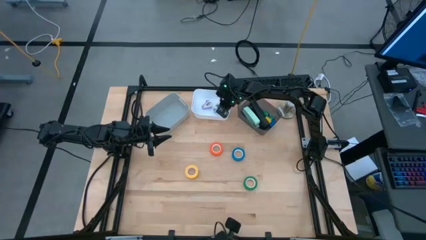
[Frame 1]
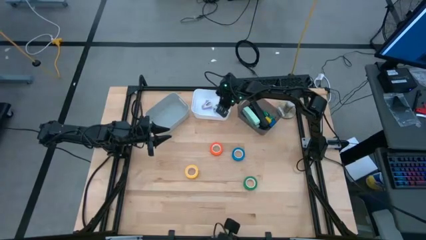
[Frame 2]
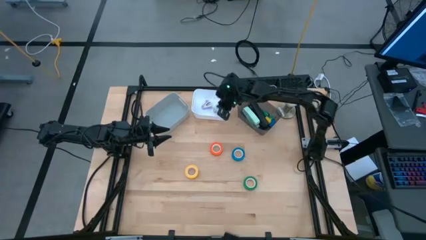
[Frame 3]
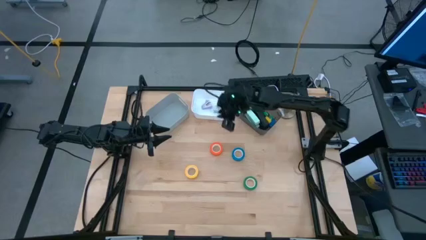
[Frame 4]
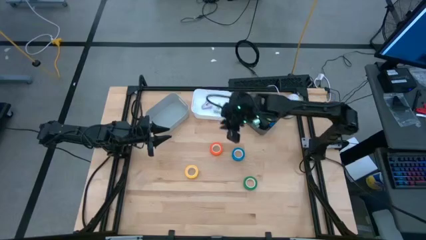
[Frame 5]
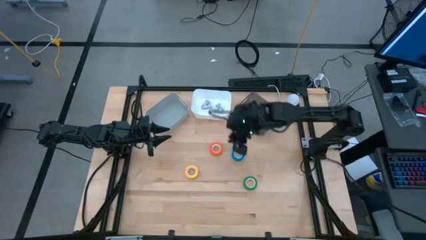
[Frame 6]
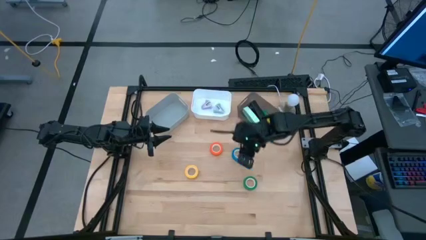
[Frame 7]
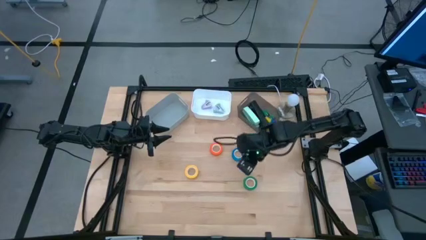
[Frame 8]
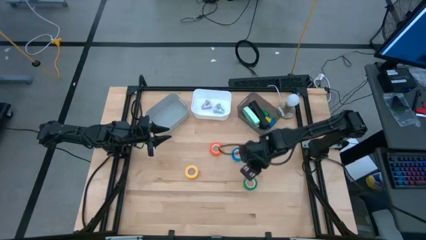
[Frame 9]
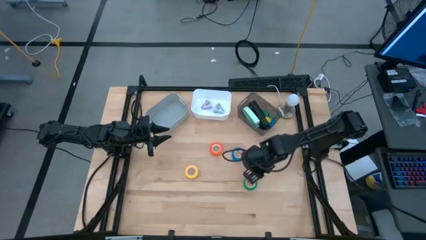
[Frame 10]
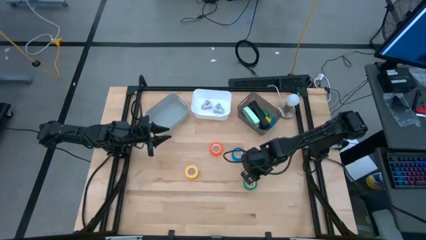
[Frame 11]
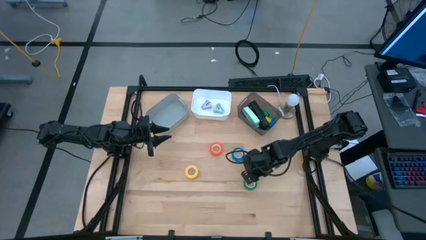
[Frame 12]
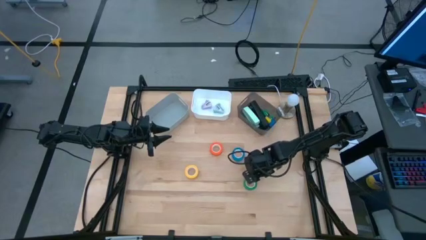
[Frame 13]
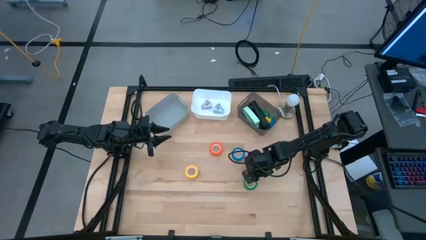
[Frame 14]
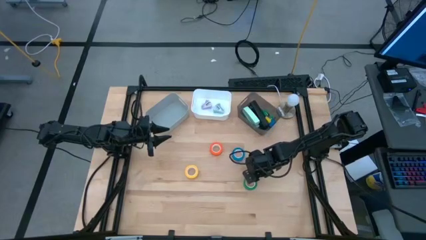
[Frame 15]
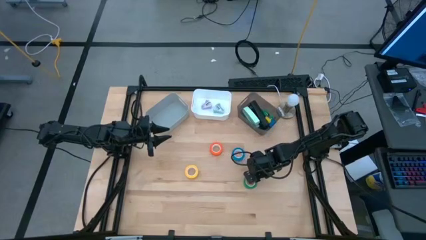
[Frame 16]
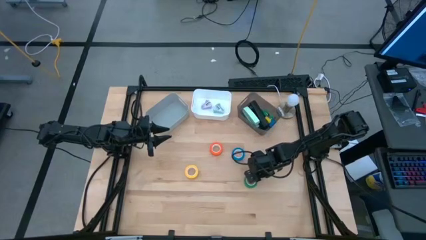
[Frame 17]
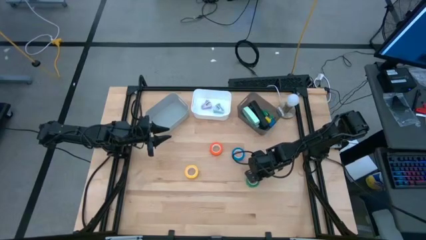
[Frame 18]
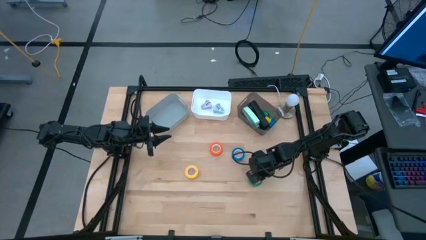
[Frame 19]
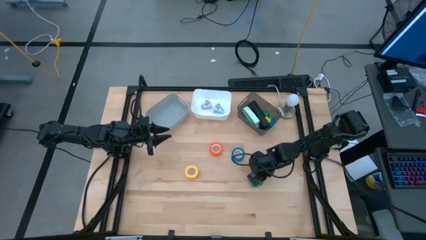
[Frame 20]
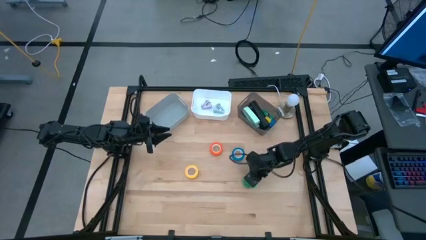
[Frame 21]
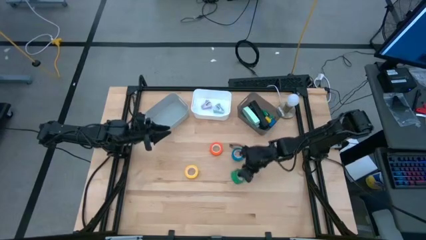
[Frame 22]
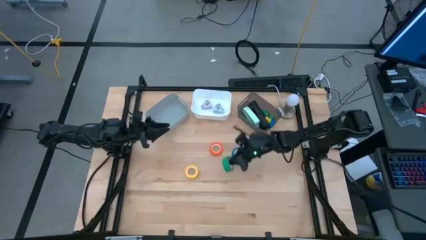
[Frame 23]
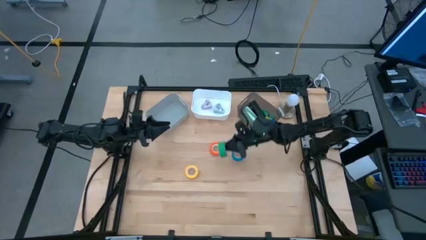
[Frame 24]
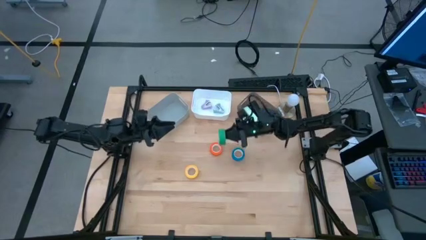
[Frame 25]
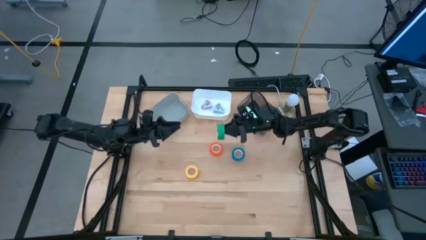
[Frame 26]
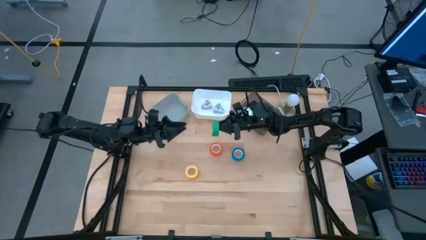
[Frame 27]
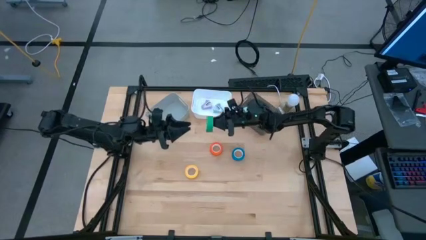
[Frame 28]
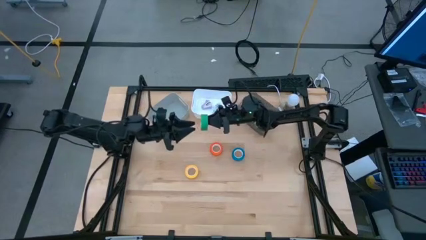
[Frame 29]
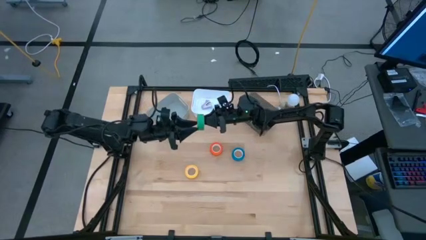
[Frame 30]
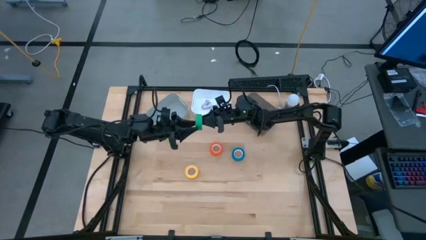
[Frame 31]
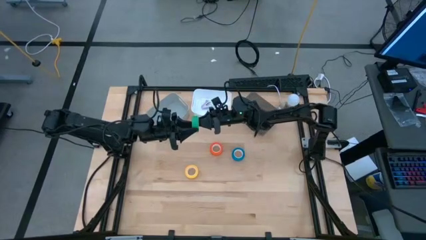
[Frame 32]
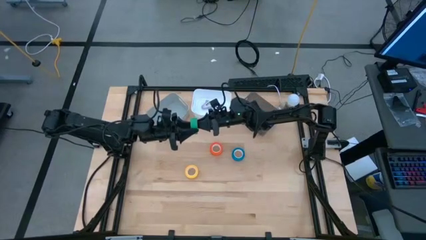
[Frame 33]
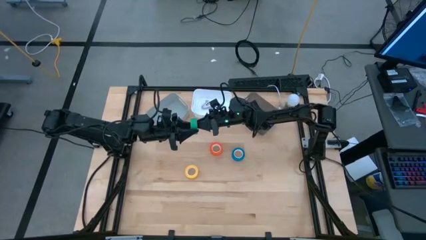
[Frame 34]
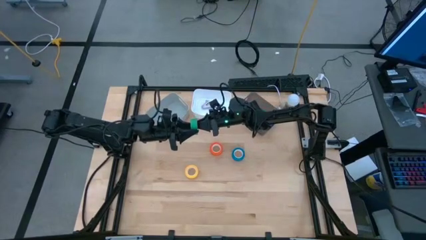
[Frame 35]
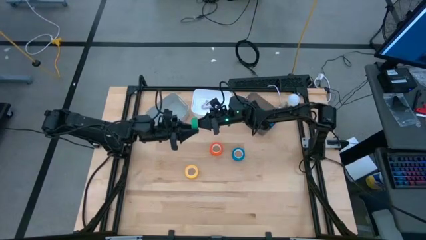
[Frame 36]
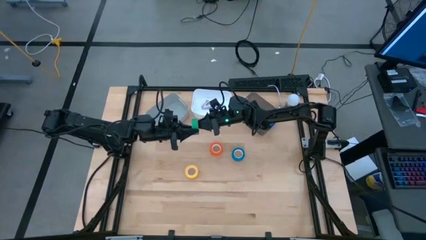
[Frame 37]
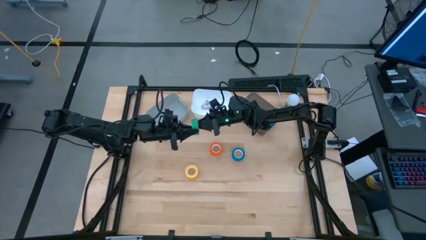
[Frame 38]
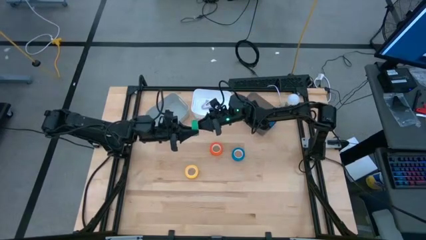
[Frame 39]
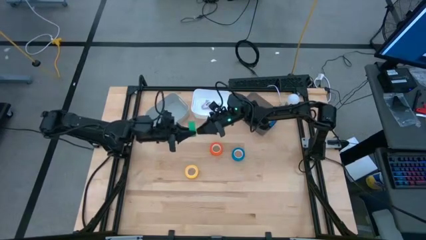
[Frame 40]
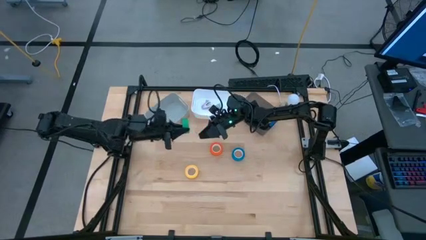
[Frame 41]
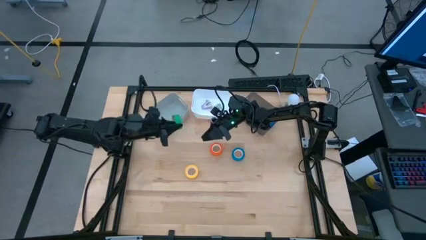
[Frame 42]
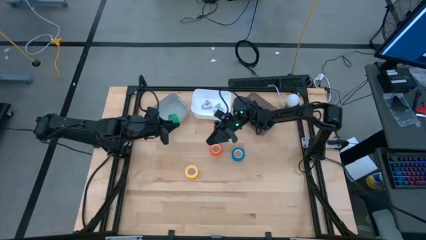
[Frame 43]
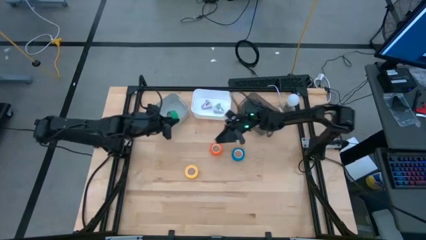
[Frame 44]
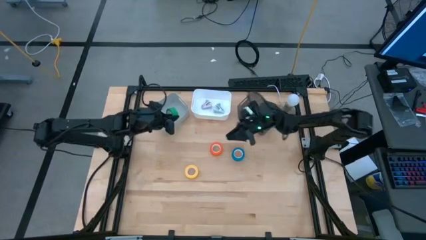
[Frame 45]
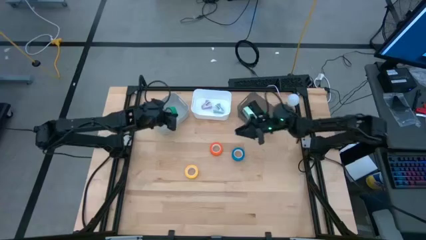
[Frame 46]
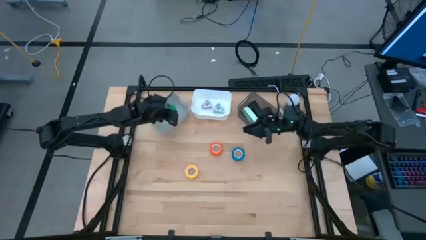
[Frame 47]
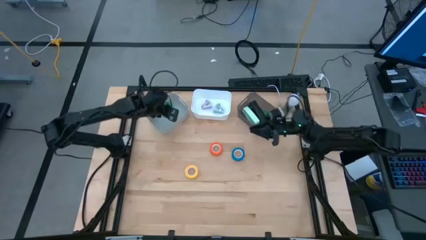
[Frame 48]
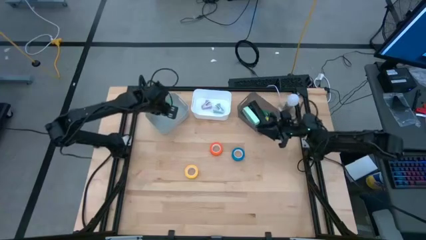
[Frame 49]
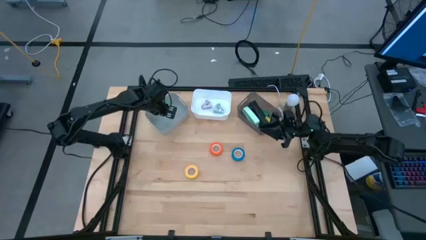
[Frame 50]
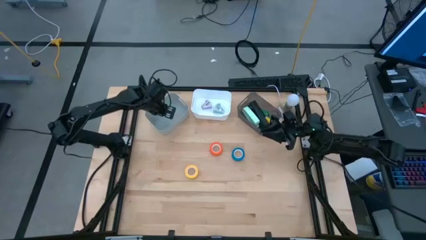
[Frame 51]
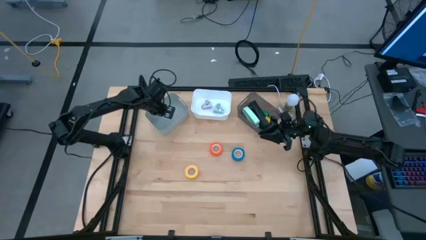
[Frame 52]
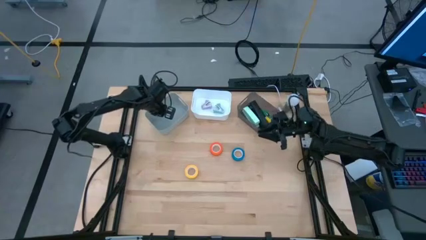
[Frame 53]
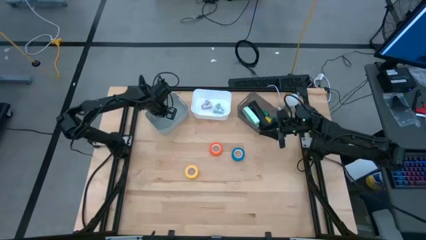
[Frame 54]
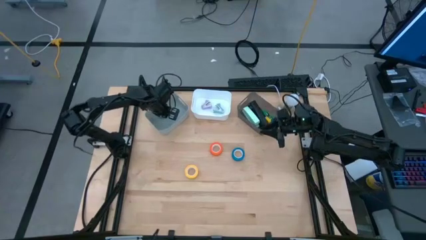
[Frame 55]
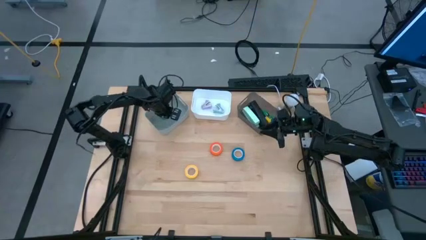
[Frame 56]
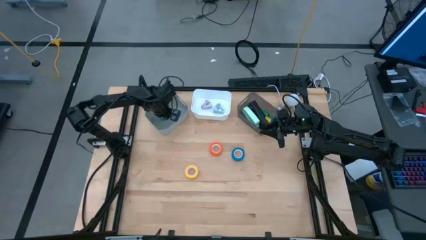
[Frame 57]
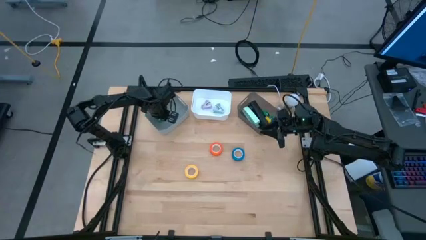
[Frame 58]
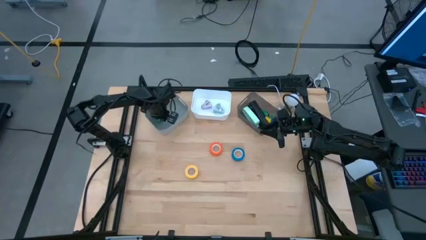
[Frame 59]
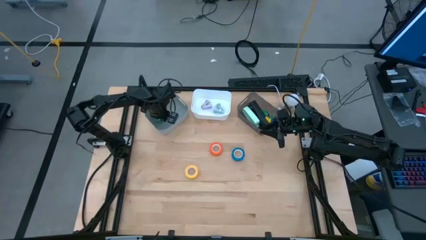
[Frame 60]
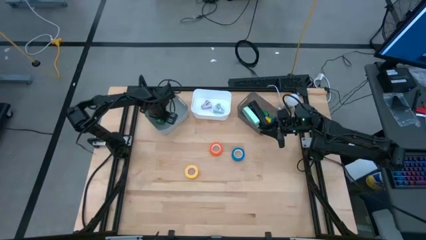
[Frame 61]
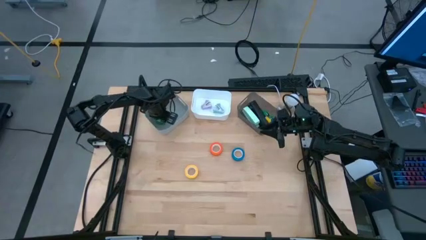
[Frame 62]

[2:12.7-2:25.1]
Task: Pick and place Stapler, Stapler remover, tape
Put the green tape into the gray bin

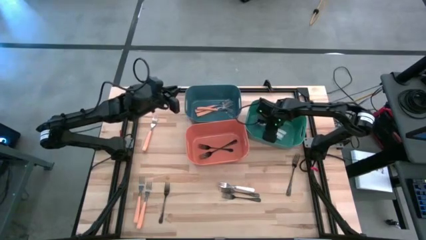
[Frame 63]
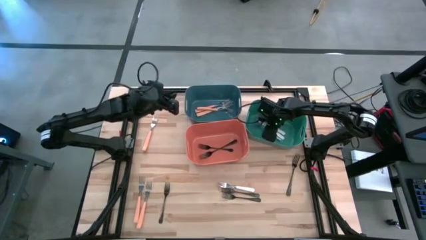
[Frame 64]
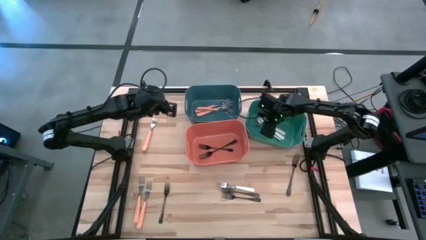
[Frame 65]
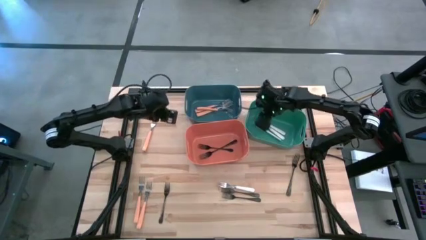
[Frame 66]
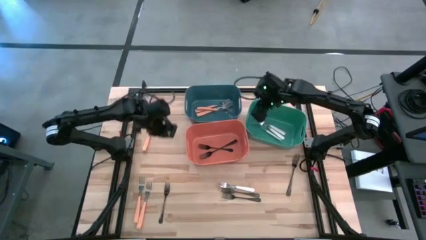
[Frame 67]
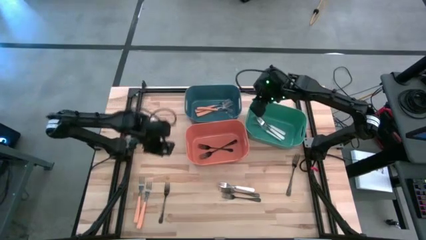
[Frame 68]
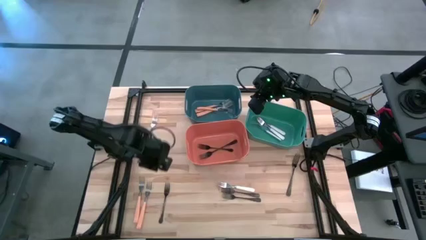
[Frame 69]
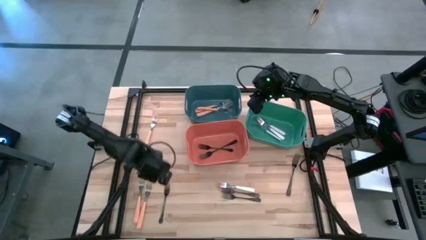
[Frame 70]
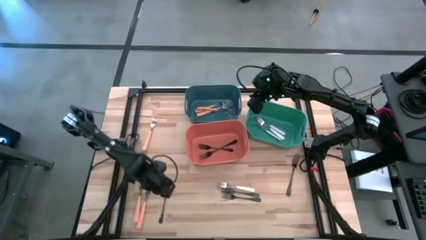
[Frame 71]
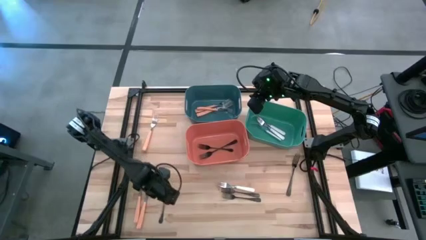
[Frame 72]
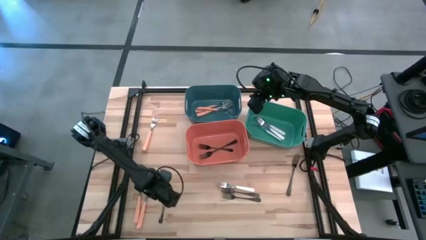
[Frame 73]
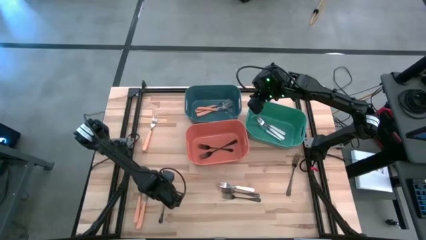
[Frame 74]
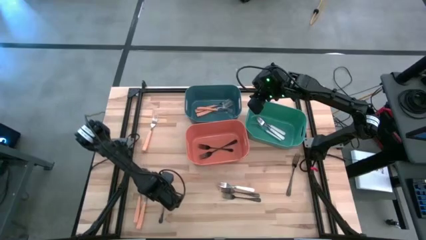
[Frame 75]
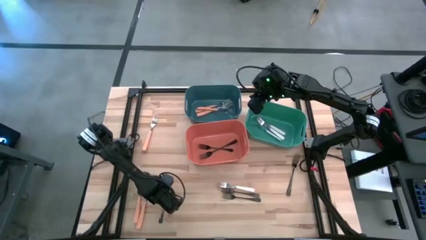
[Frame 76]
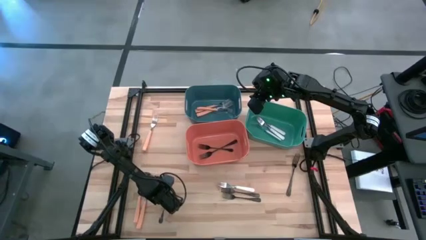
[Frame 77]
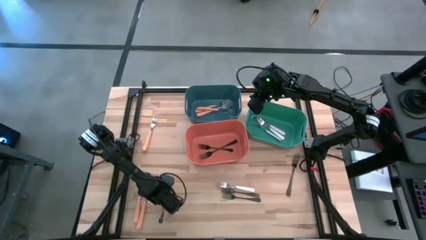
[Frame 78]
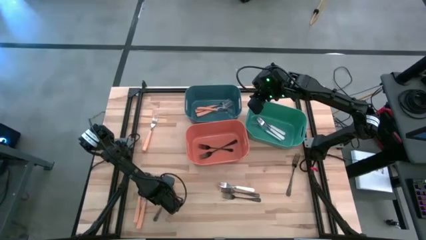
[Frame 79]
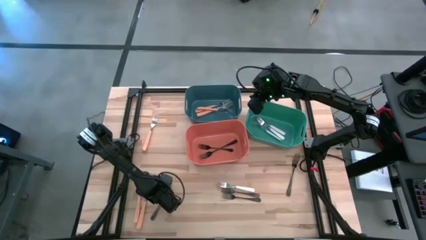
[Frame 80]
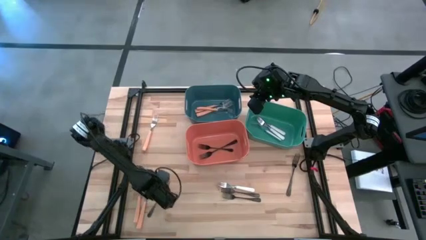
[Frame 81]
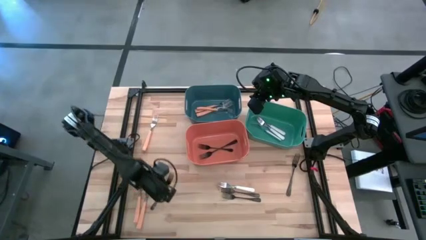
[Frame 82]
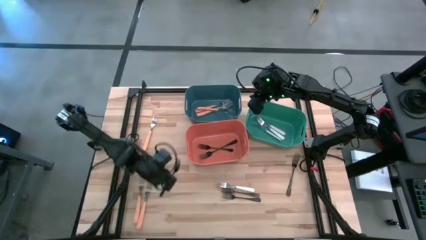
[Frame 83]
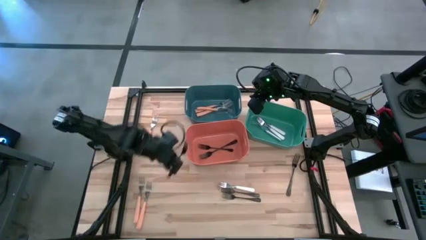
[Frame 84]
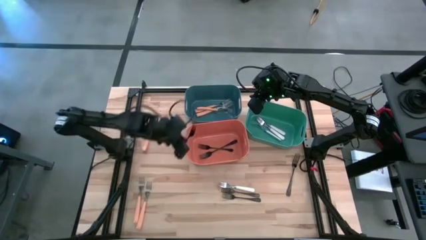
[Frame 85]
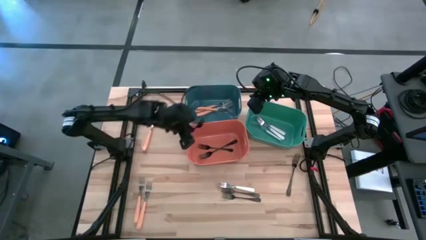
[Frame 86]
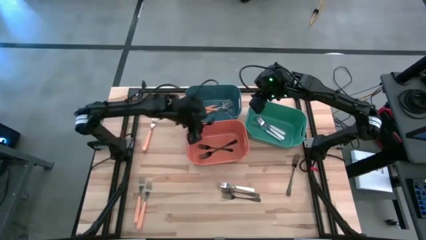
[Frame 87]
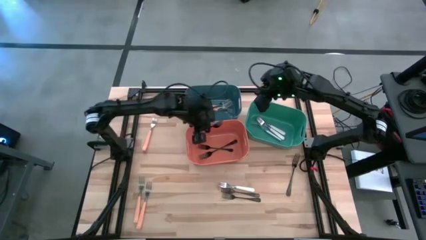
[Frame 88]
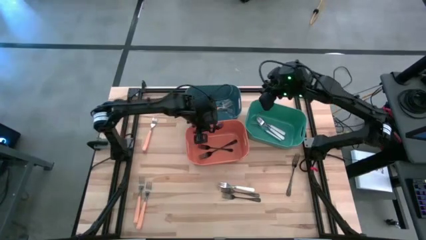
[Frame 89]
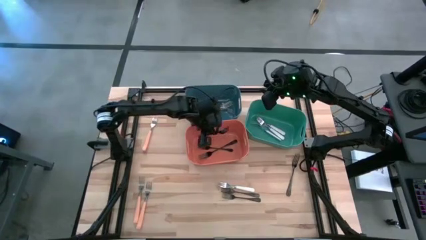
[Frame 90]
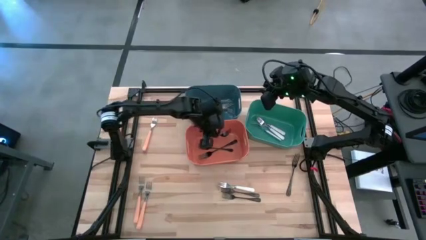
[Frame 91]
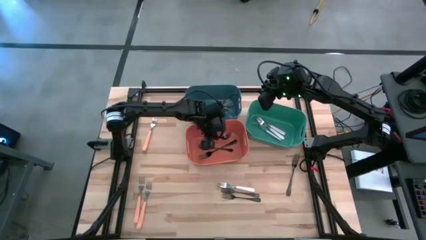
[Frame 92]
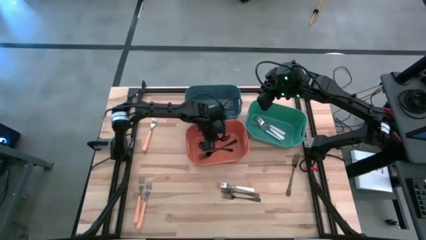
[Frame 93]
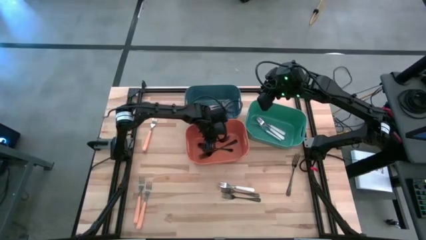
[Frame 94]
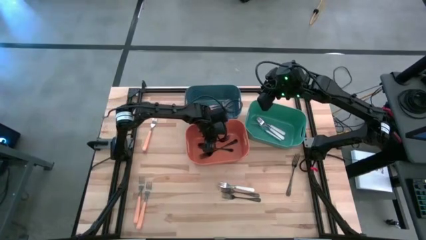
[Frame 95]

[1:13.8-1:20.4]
Task: Sort silverware by color (type)
Put the black fork into the orange bin
